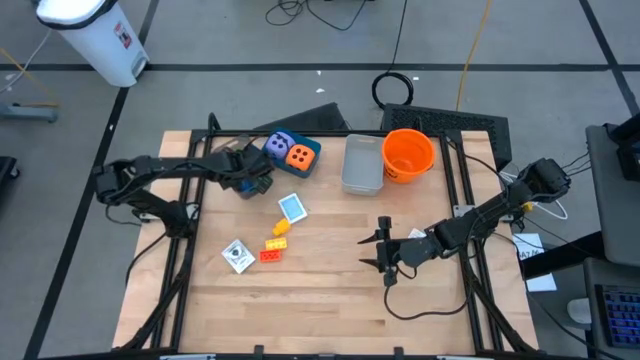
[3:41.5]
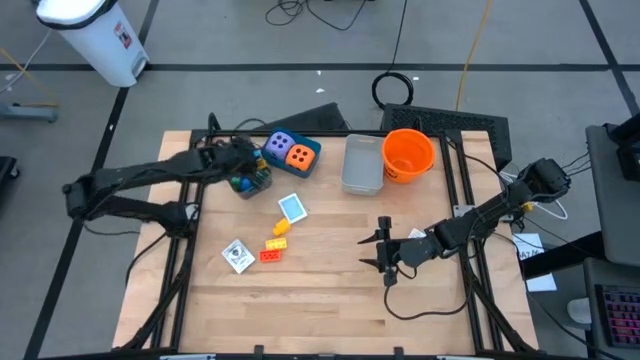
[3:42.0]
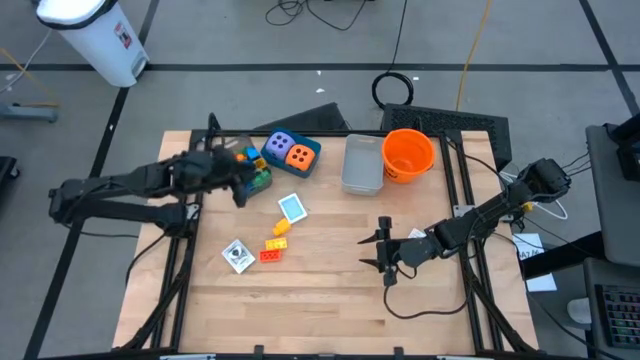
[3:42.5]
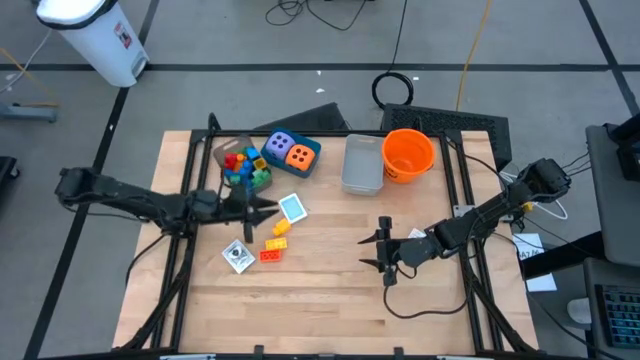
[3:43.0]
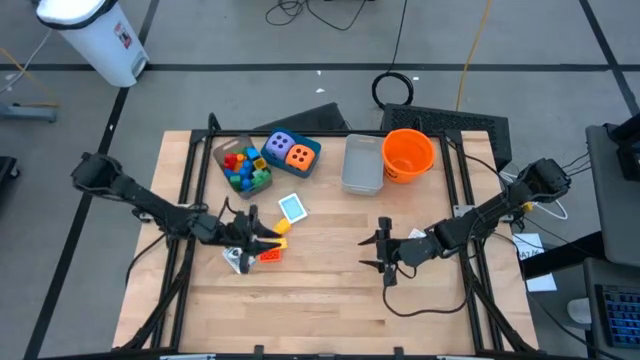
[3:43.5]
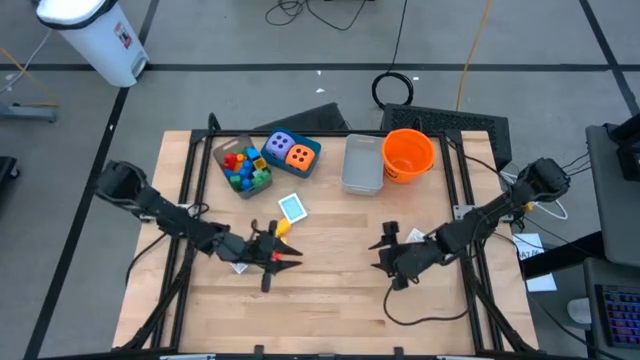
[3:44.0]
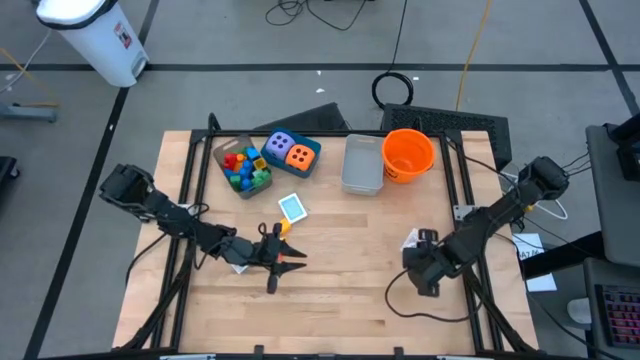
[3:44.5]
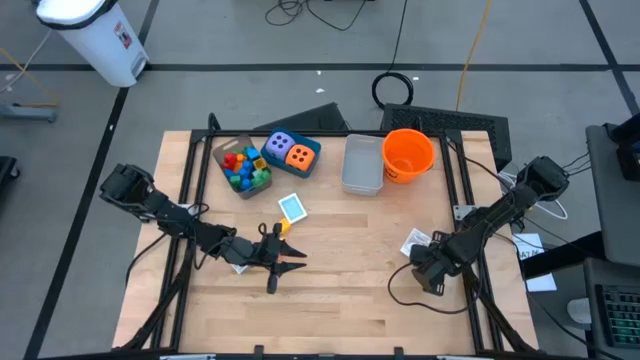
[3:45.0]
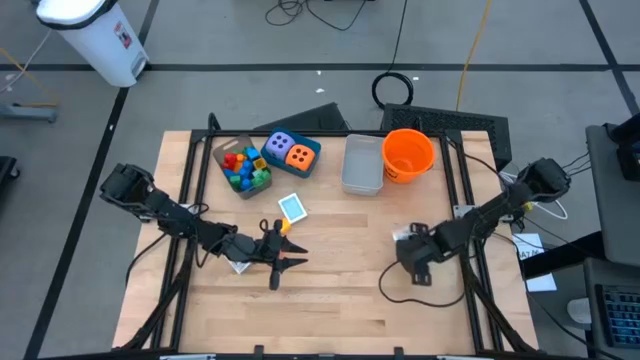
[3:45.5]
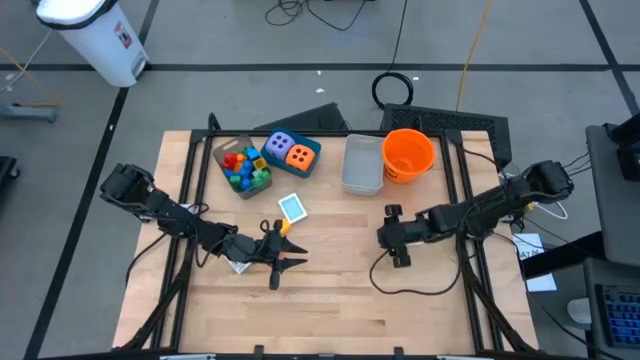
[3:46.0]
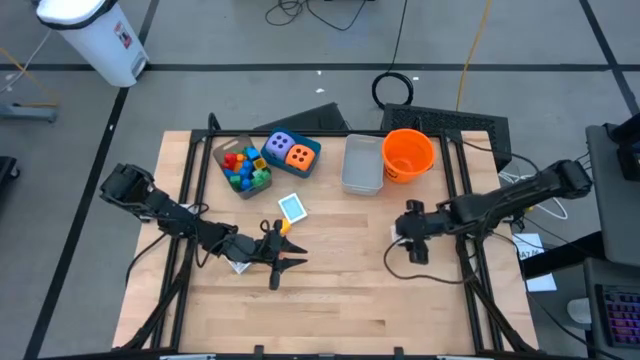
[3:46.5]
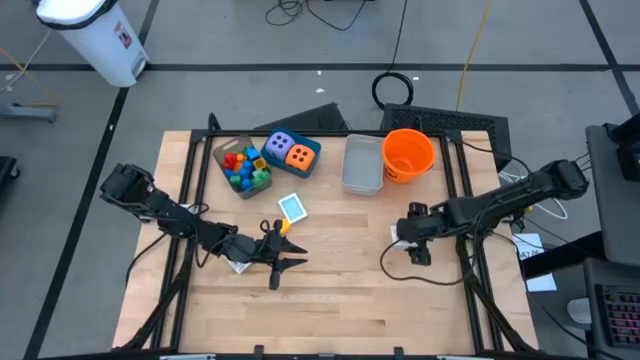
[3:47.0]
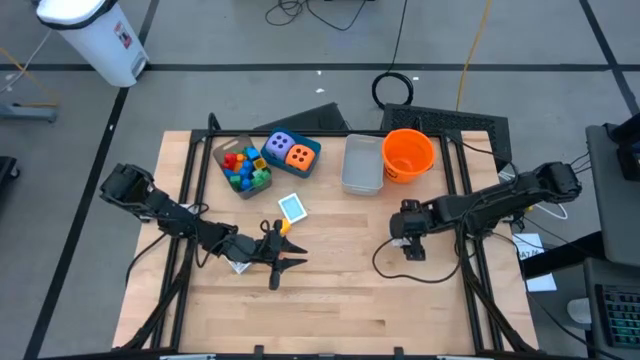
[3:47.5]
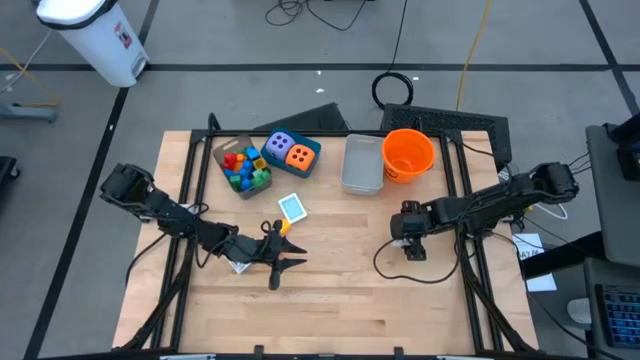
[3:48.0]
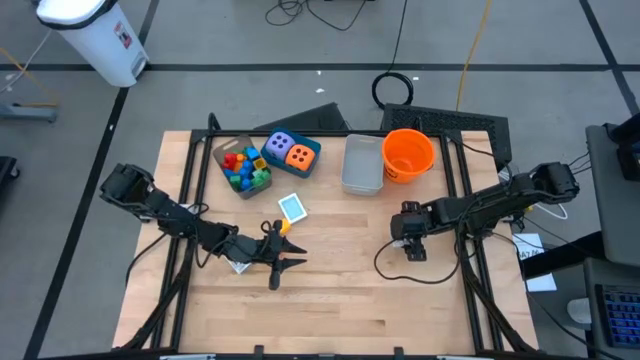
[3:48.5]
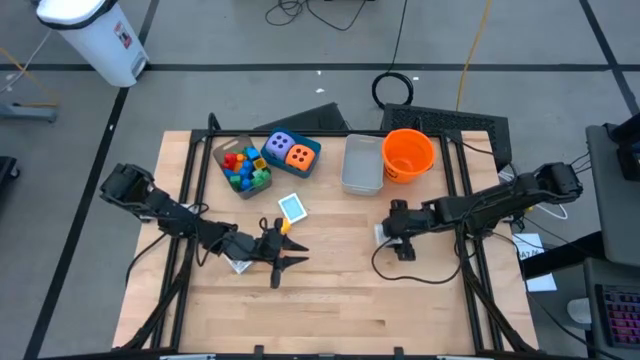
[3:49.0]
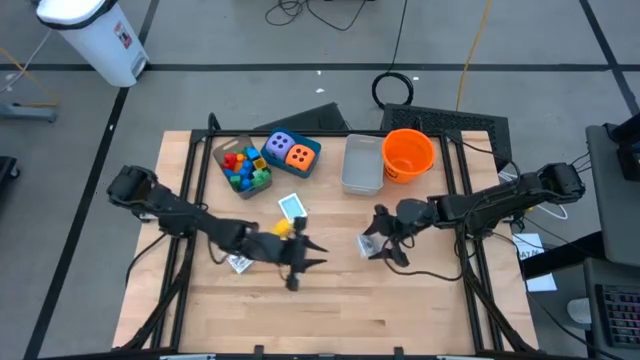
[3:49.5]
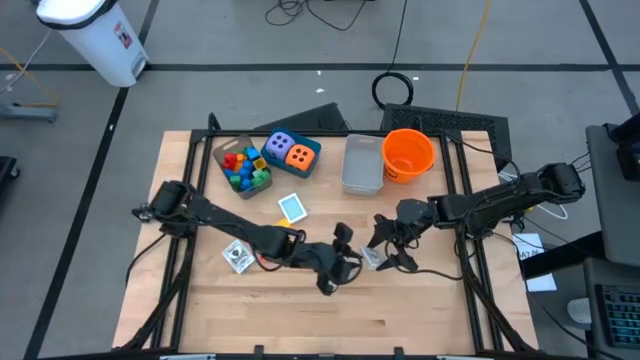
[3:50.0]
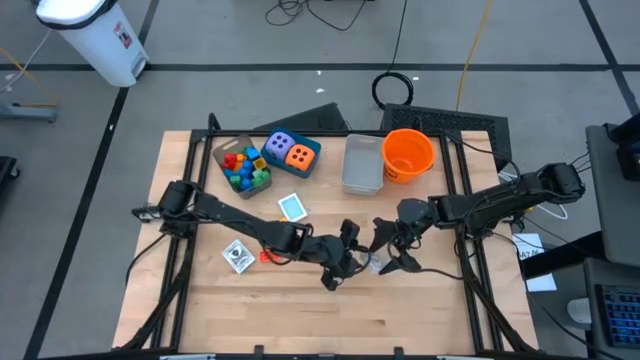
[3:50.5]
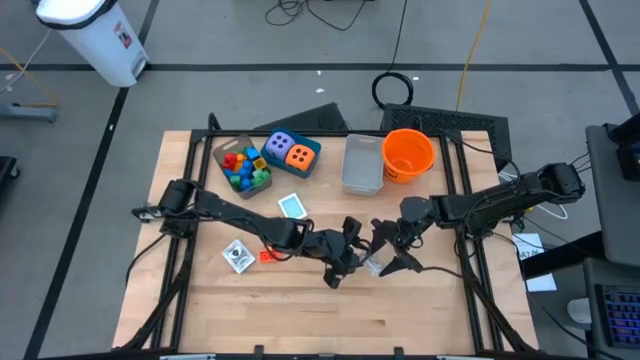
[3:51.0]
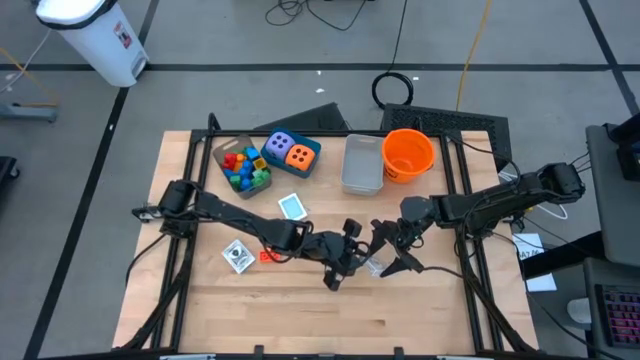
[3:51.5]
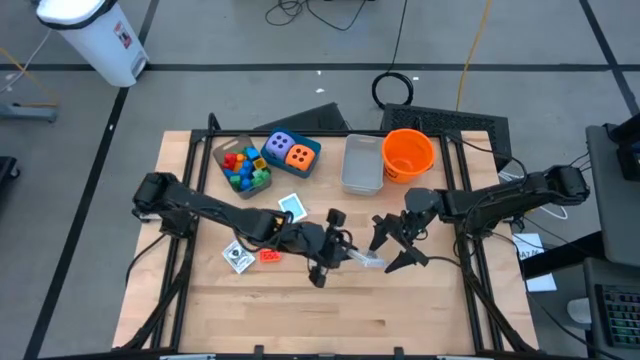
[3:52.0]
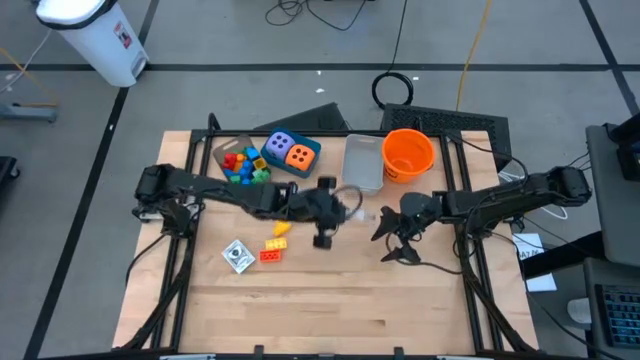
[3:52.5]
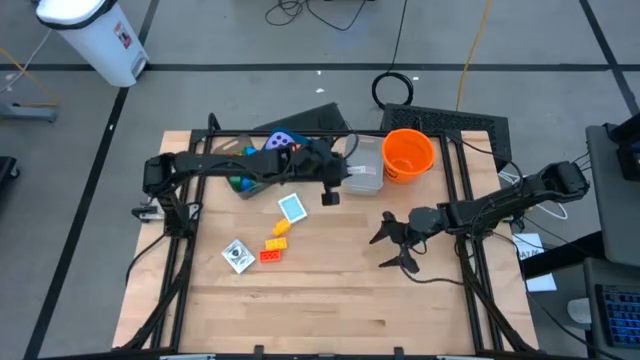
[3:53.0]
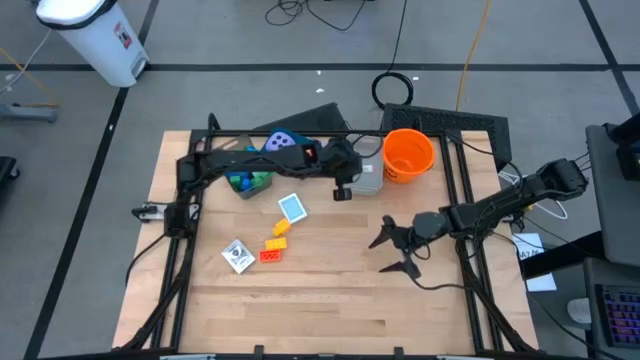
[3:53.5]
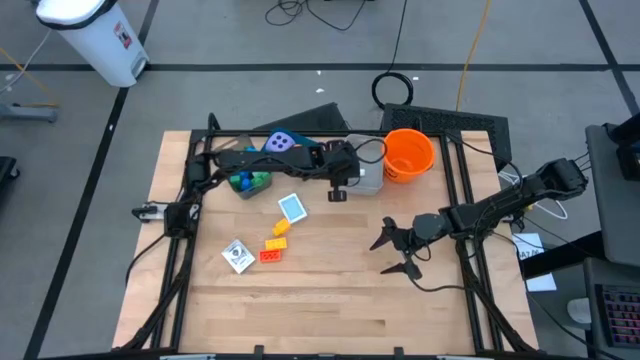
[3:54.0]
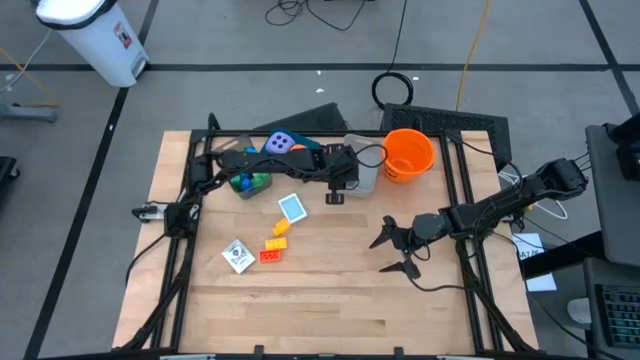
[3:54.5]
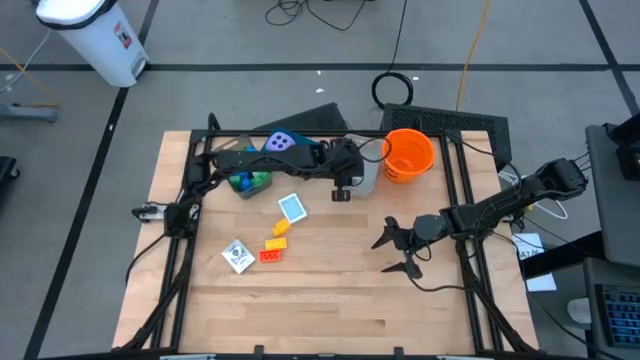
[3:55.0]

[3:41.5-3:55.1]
Task: Pick & Place Toys
Put the brown deck of cards into the gray bin

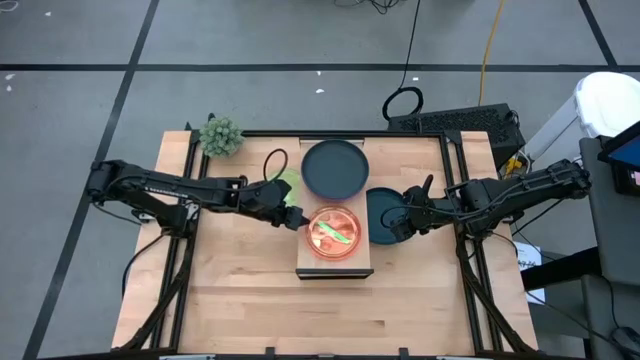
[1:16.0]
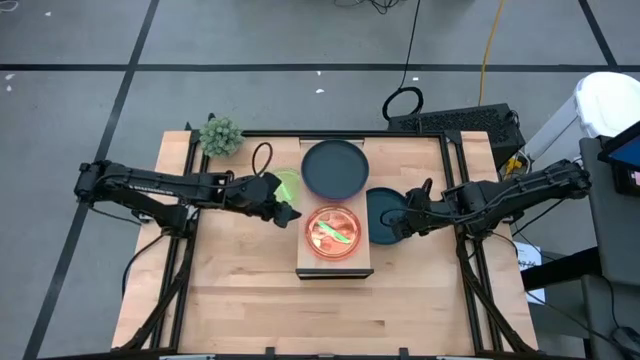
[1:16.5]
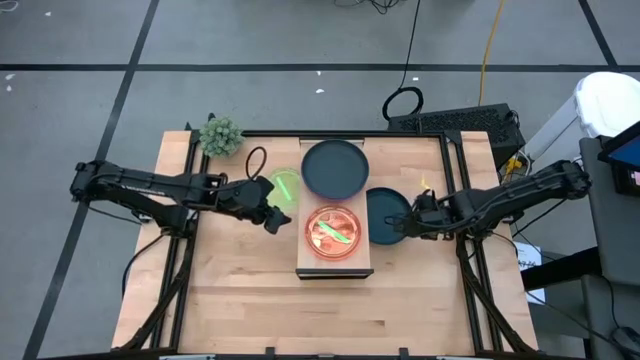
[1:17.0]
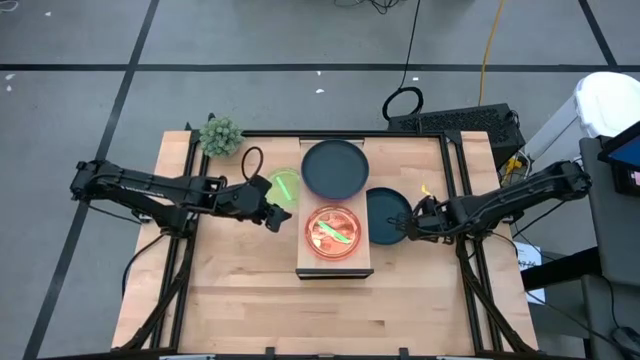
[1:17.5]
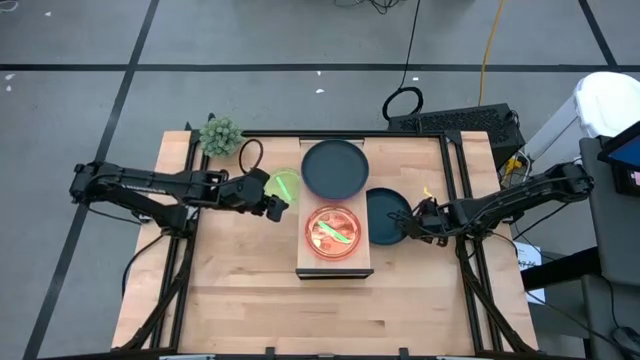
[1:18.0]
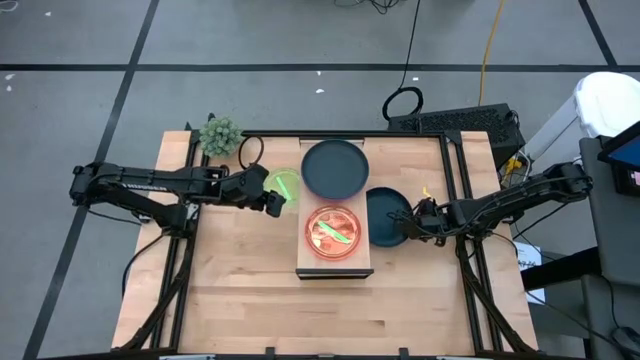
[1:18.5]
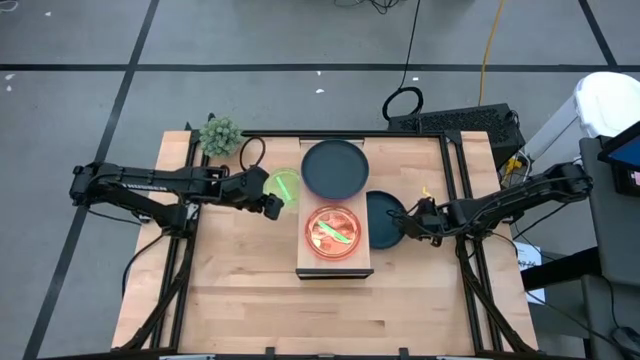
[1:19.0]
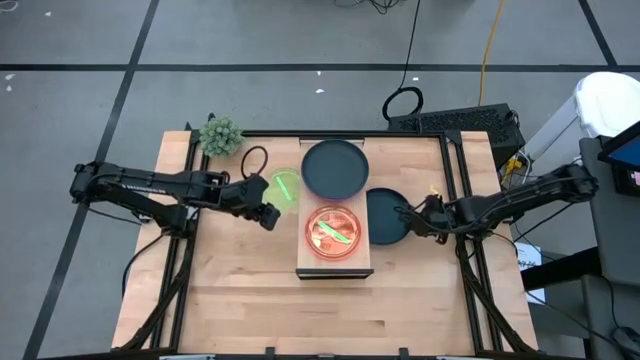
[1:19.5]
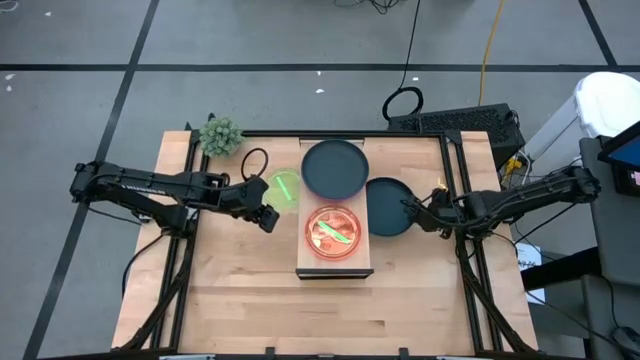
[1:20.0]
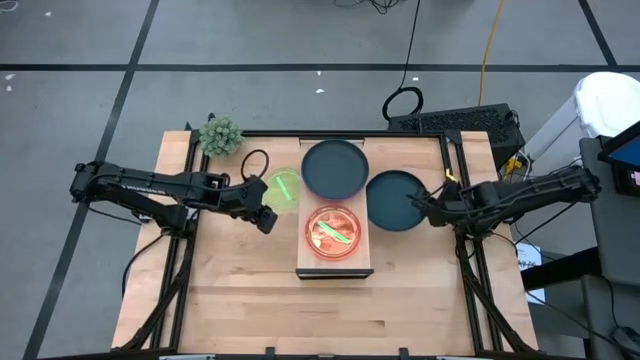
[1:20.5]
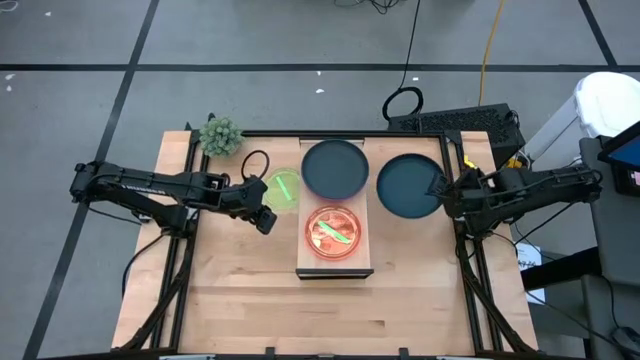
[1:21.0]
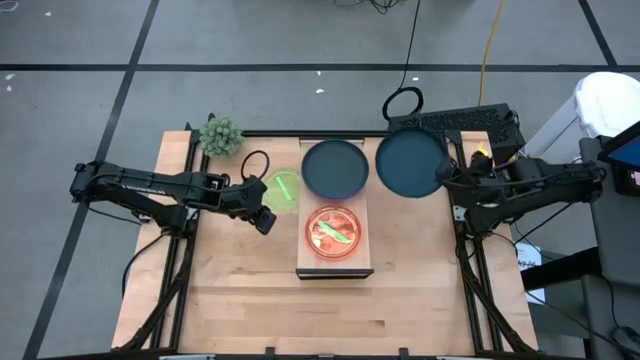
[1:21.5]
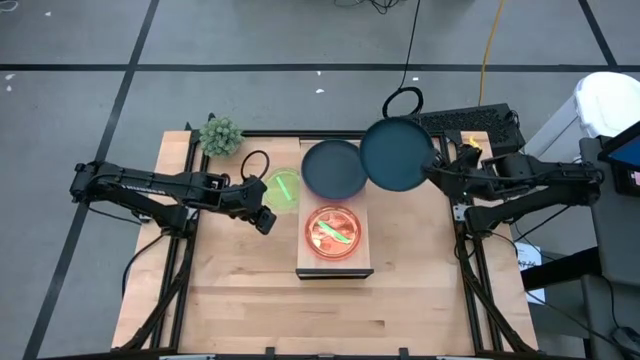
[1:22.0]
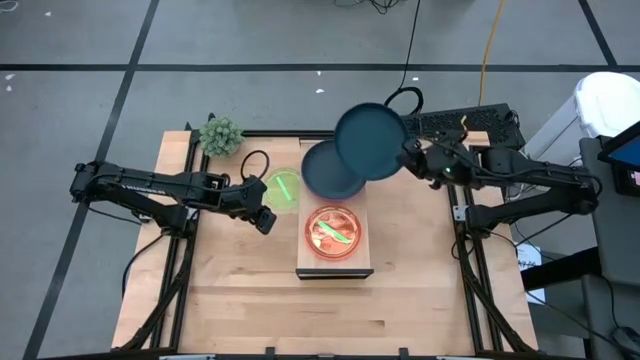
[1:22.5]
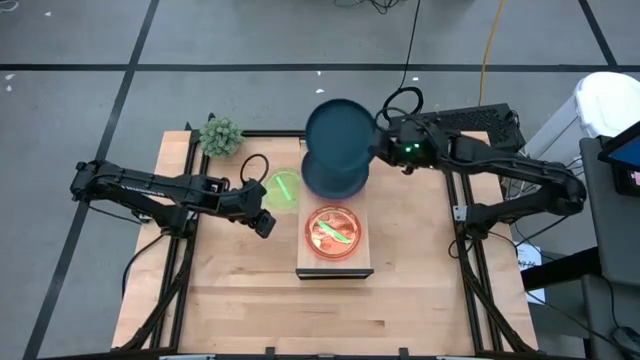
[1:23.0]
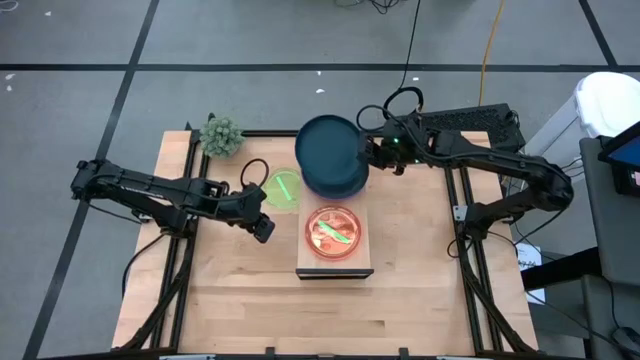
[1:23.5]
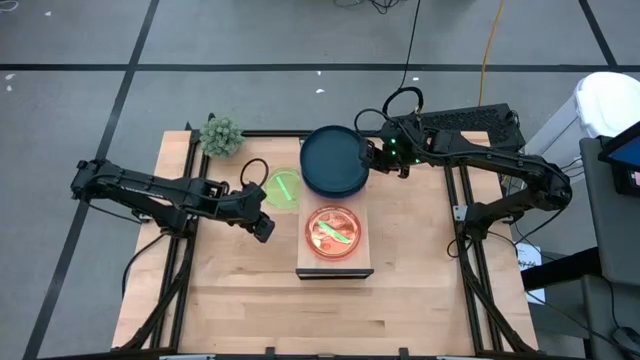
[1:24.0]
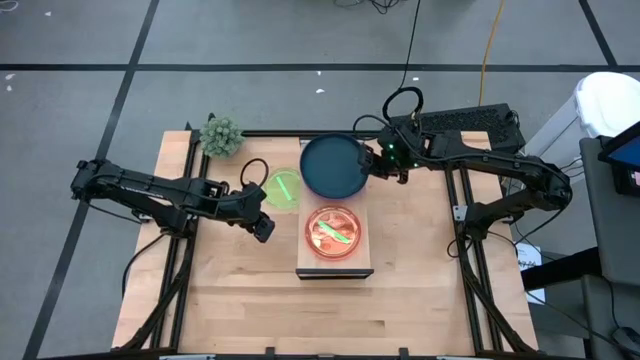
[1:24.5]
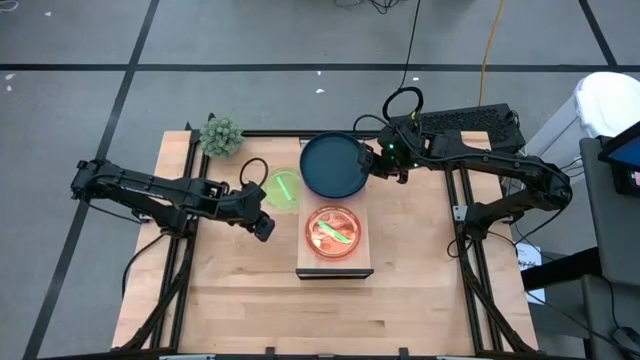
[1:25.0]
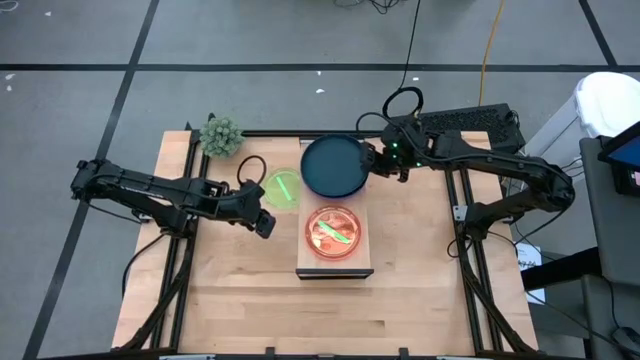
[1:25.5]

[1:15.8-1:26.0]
Task: Place and stack plates onto a shelf
Stack the dark green plate on top of the other dark green plate on the shelf
